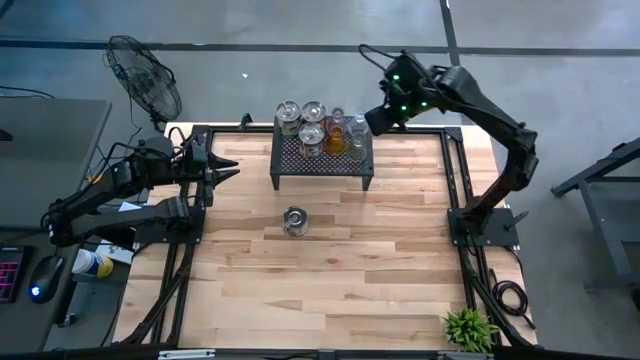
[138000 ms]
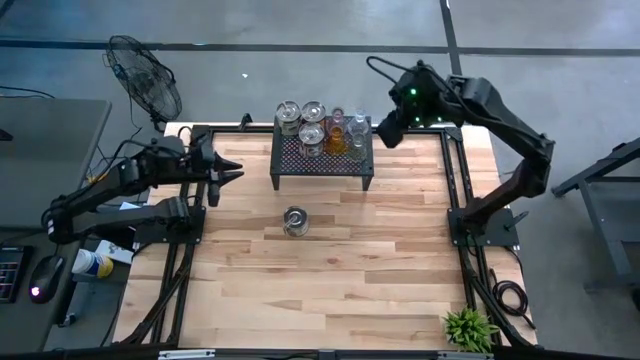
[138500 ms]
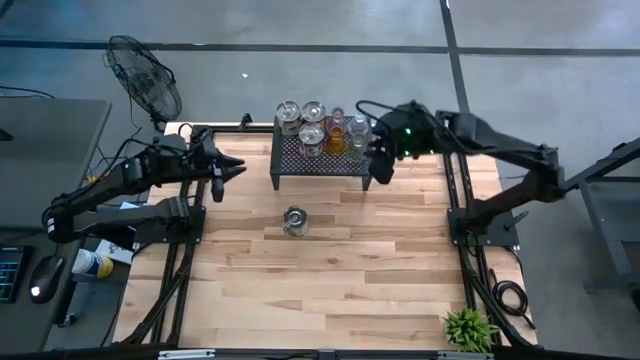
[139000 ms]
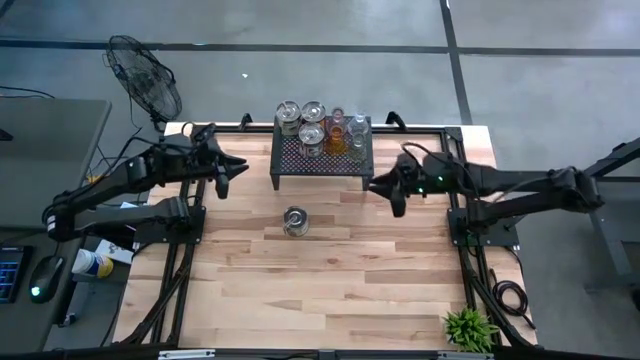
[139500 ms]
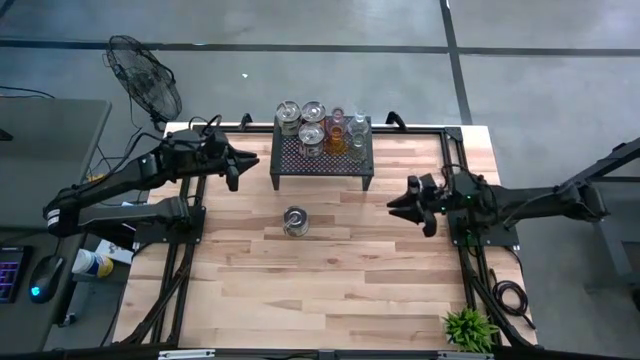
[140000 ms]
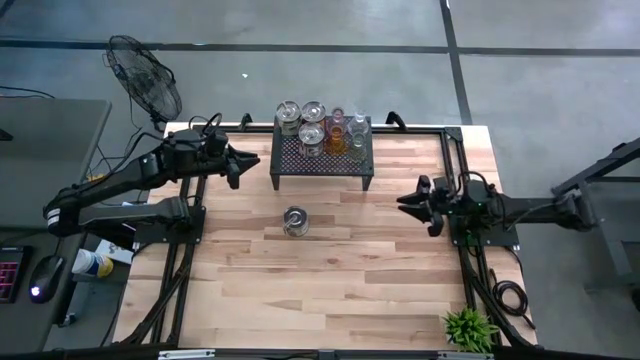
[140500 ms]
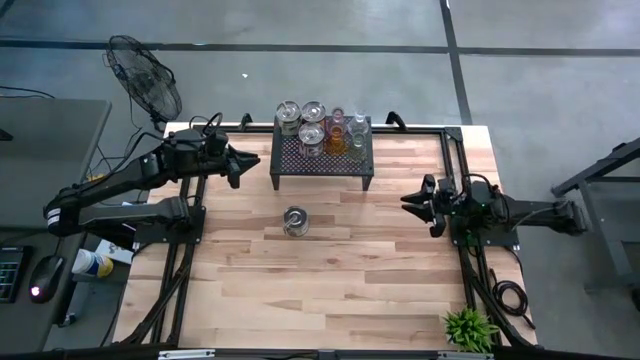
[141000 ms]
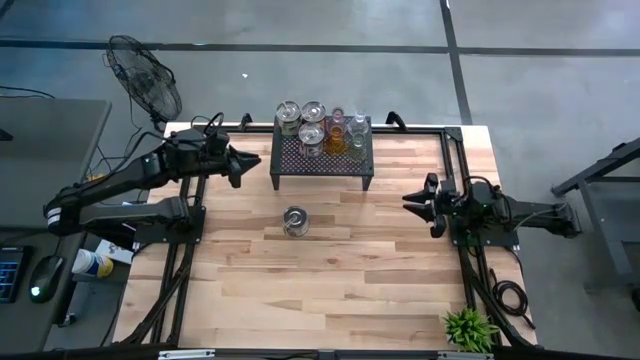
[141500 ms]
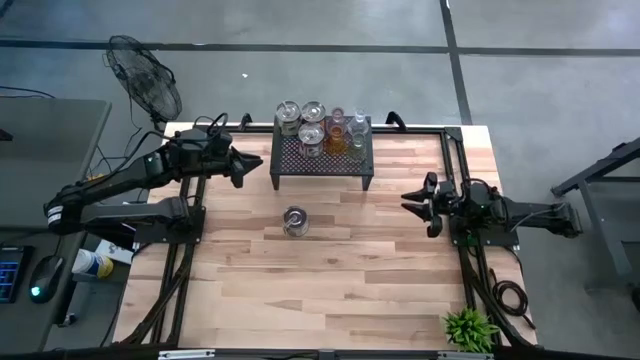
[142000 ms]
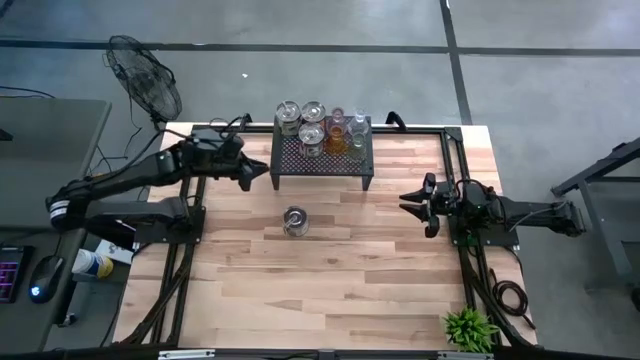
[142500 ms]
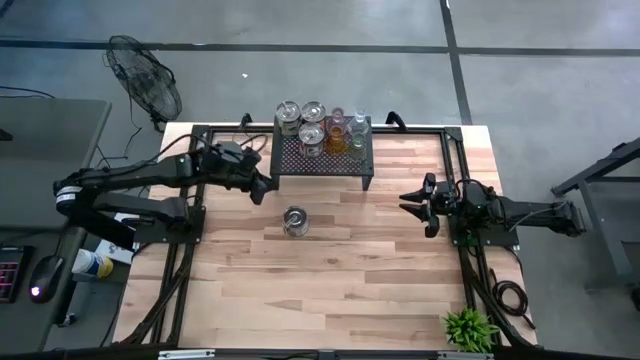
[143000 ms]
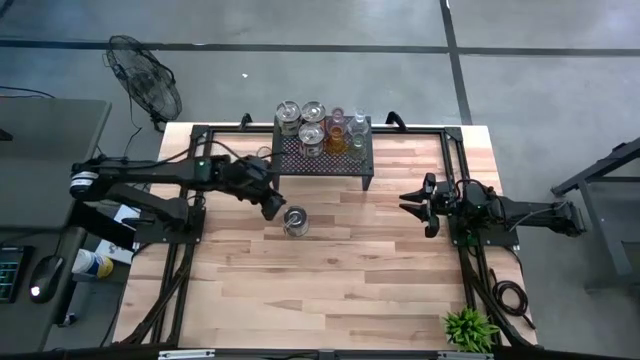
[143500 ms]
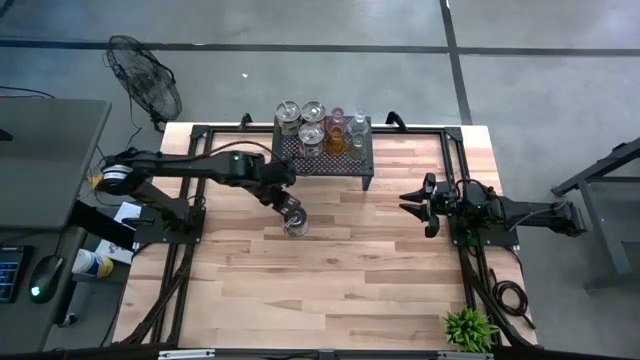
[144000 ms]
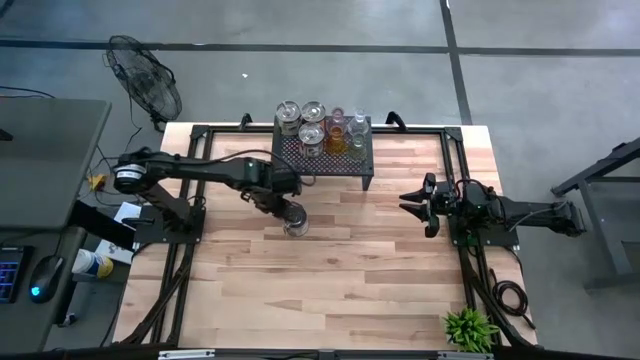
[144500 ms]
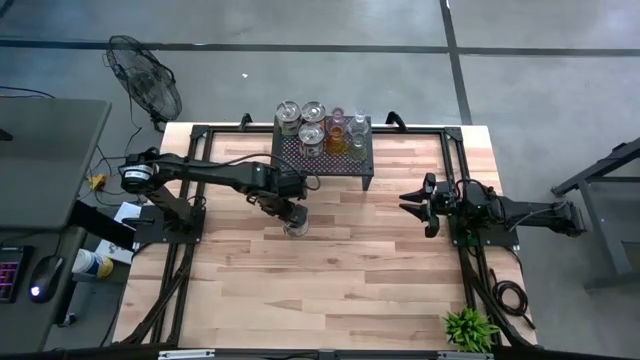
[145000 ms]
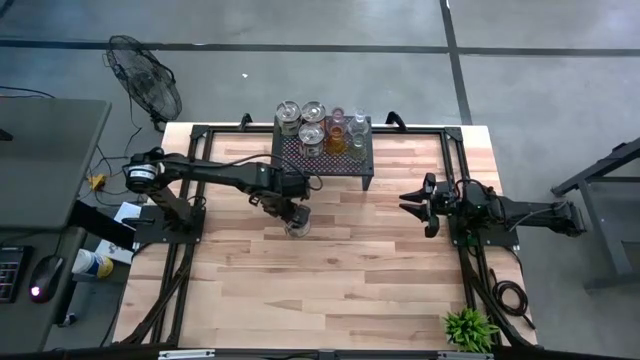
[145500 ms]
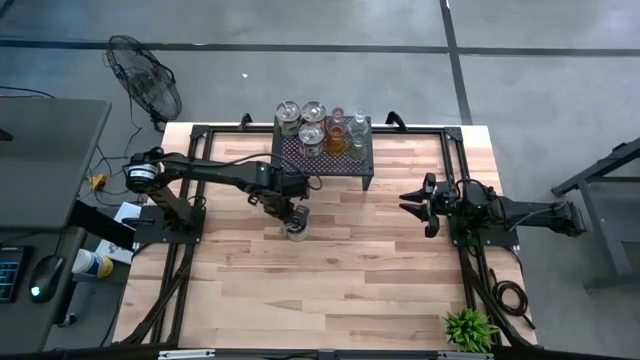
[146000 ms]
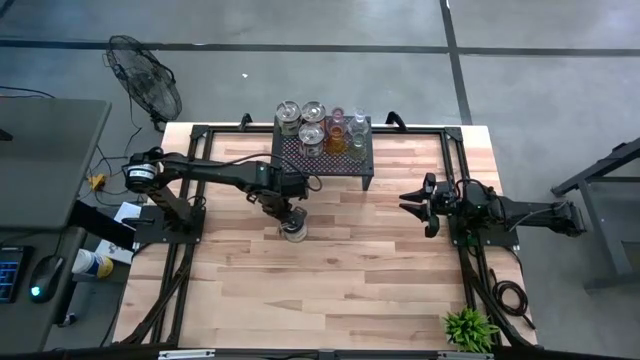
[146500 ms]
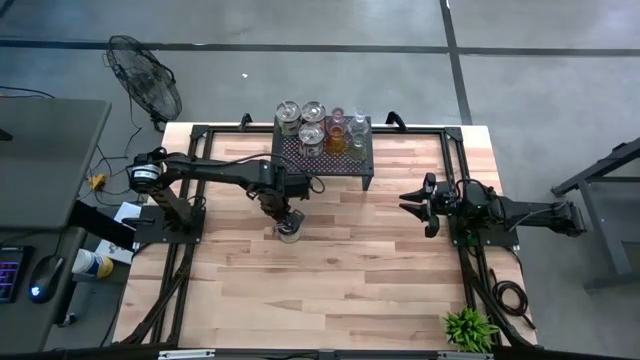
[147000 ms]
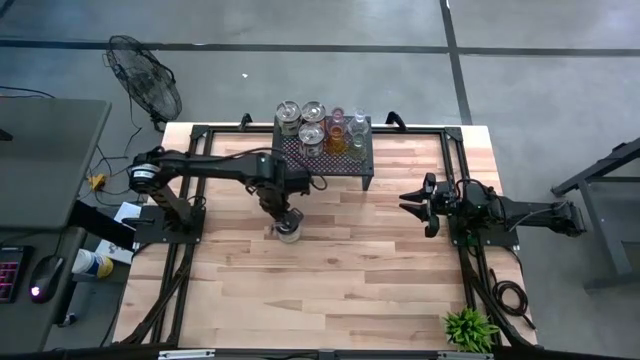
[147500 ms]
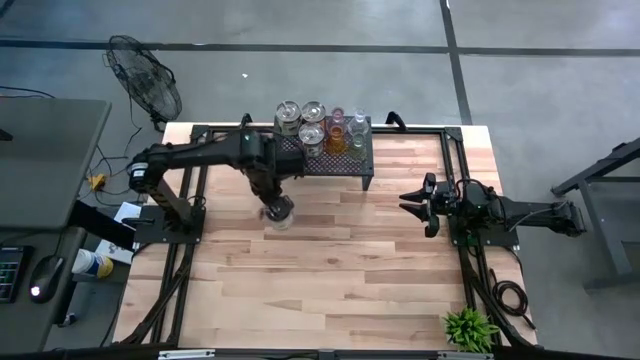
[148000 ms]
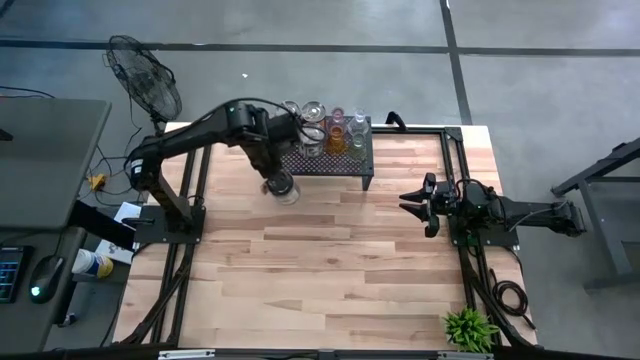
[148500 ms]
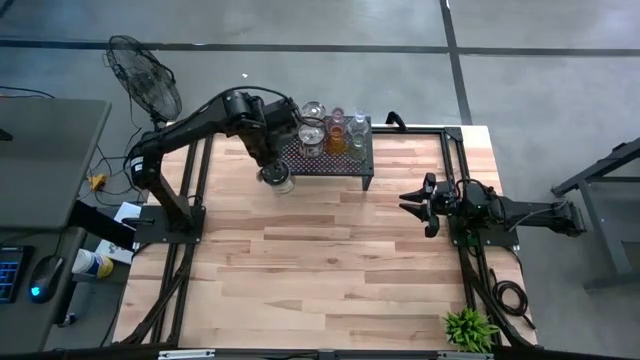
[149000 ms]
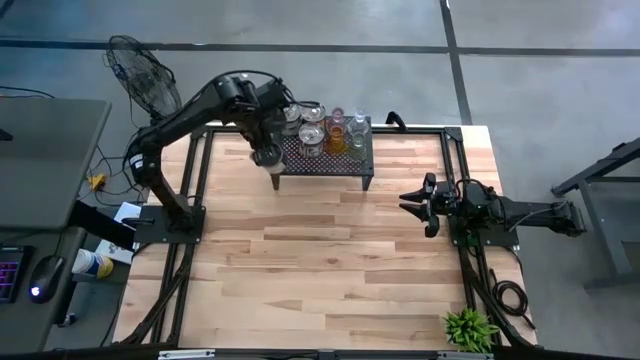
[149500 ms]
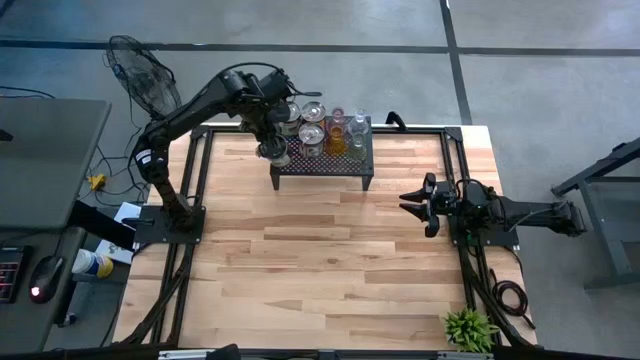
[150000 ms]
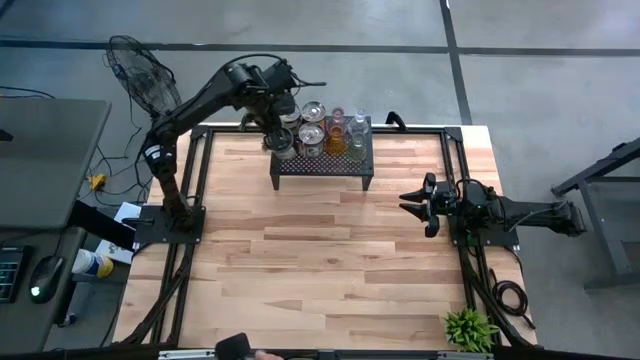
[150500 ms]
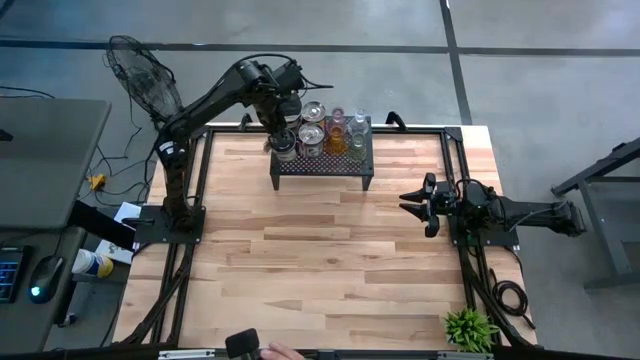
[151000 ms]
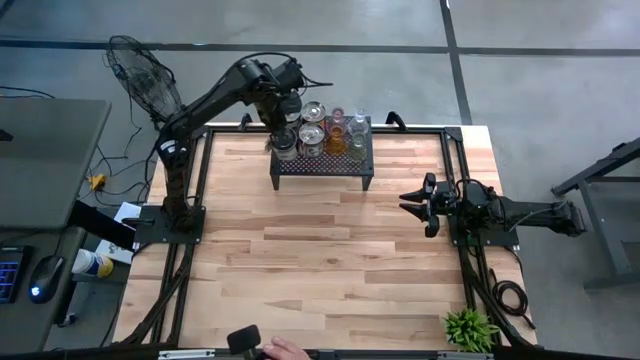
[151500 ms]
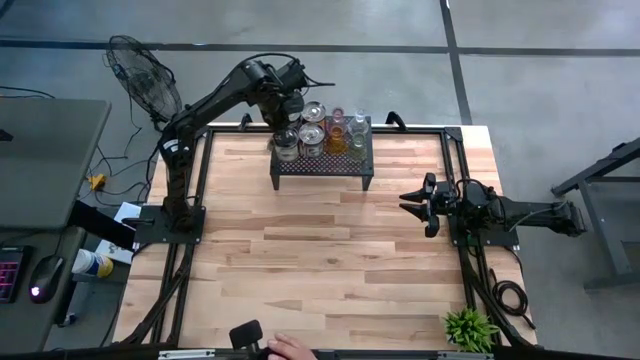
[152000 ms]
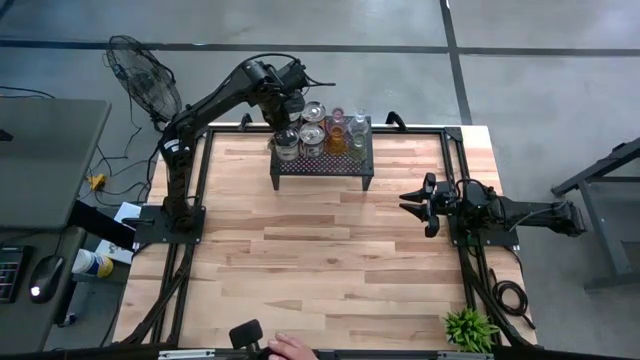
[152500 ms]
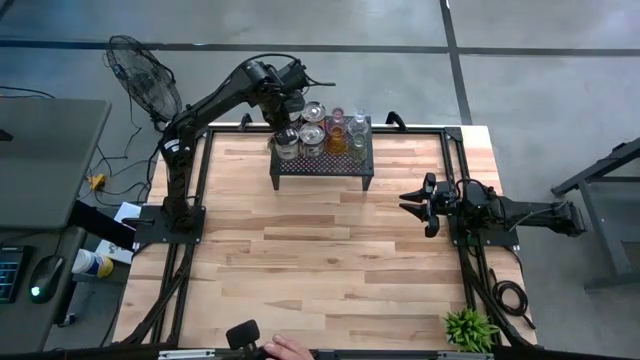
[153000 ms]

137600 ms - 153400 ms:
Task: Pick & Place candle stick holders
Put the silver scented candle on the shelf

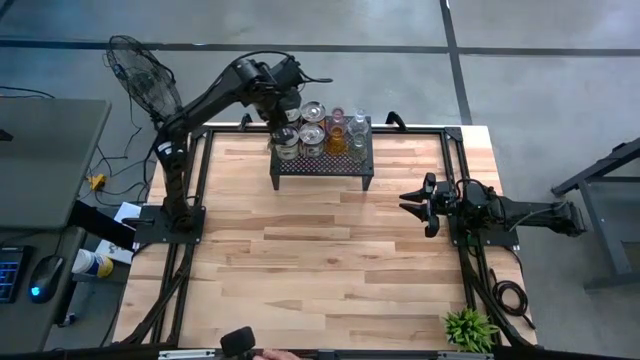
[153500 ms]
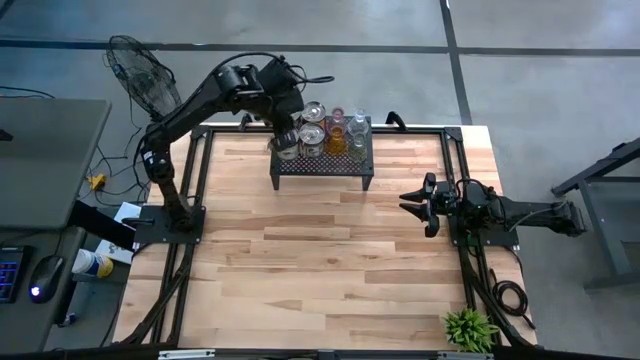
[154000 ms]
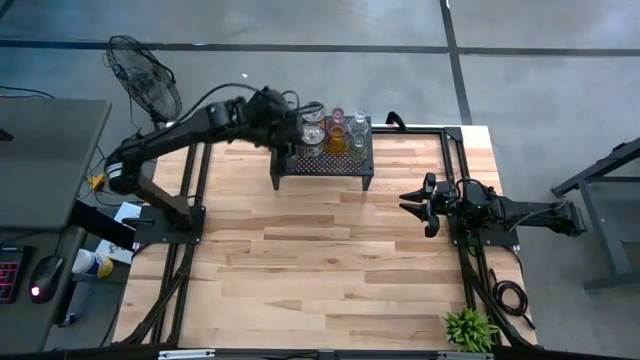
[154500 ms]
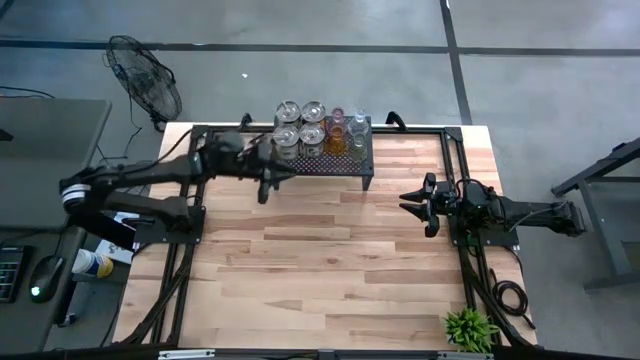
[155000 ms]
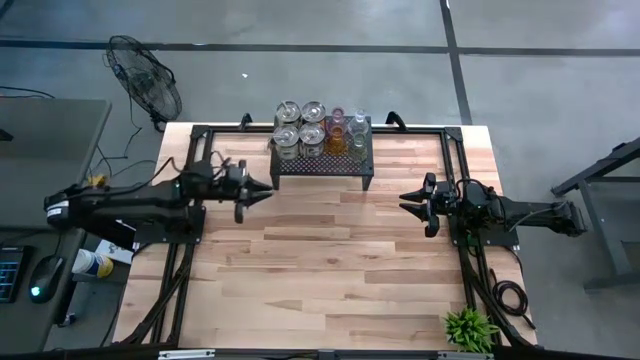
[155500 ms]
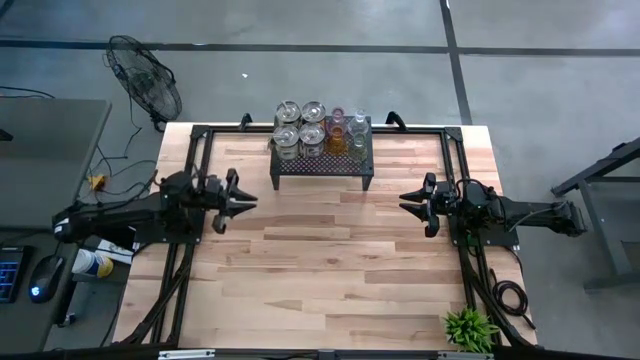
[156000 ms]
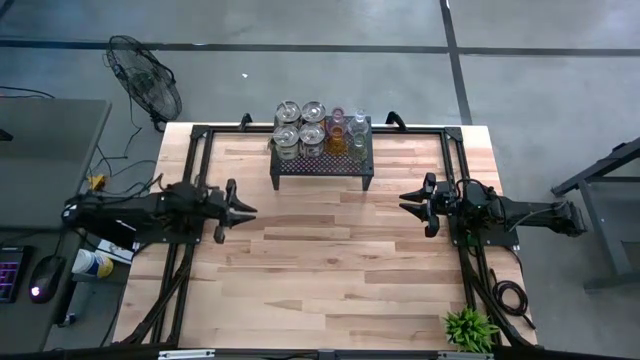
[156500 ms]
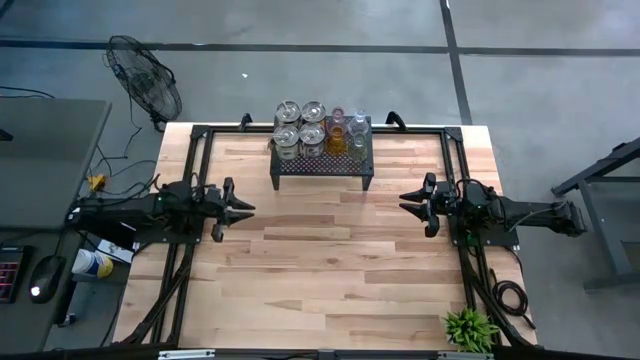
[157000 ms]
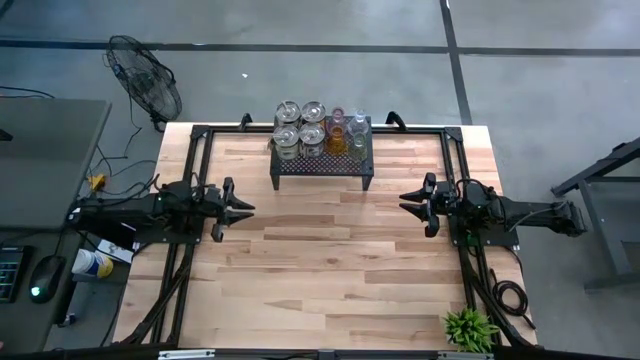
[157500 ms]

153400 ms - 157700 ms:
Return to Home Position
